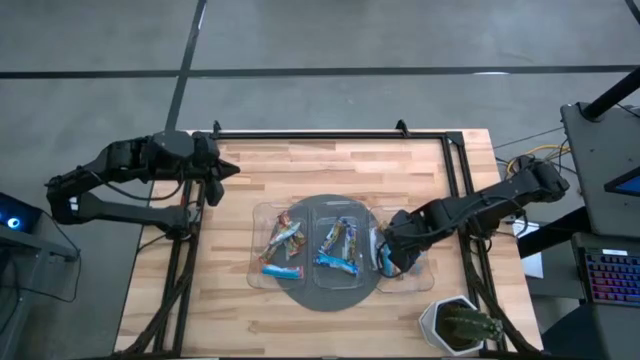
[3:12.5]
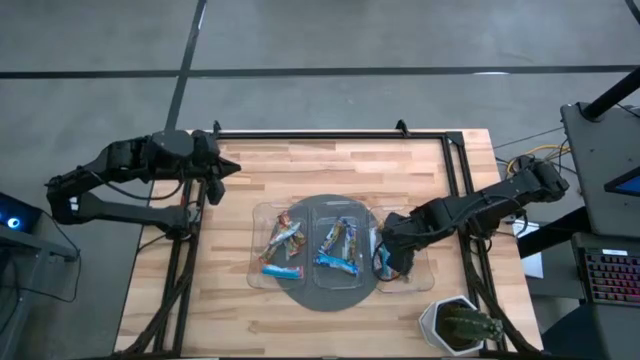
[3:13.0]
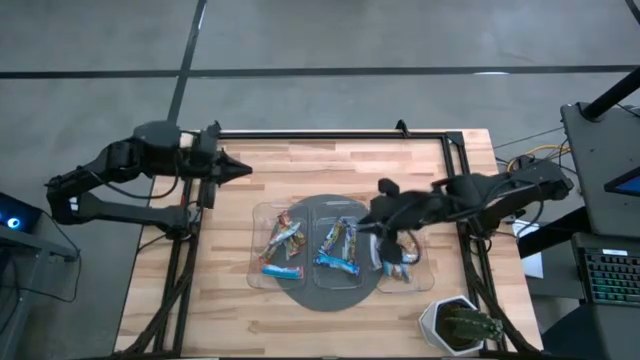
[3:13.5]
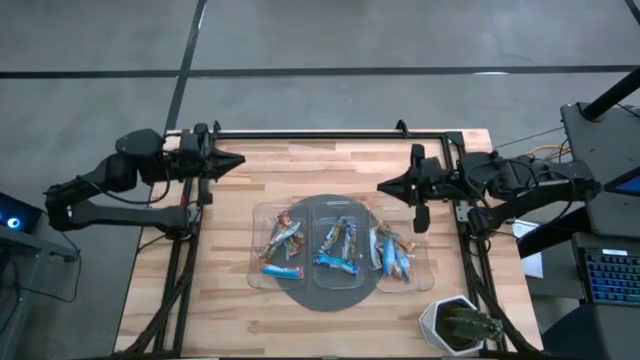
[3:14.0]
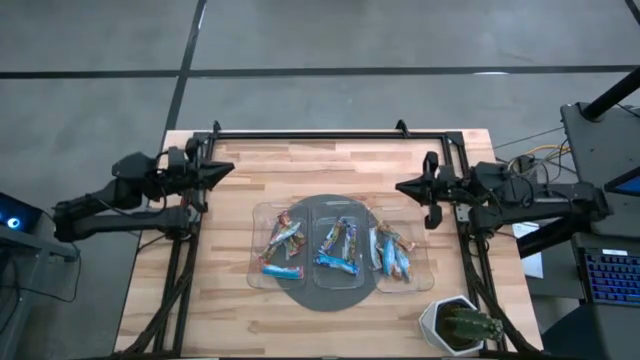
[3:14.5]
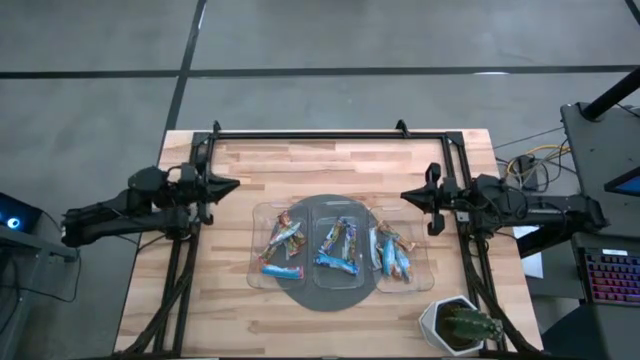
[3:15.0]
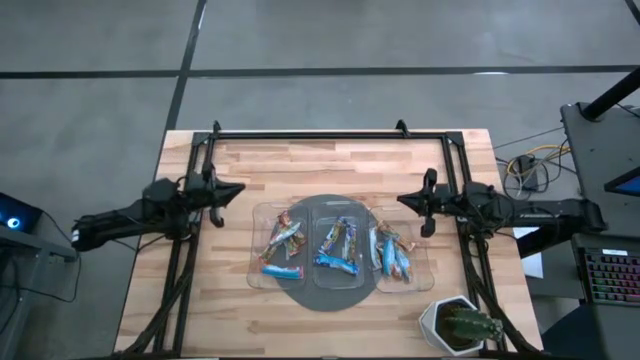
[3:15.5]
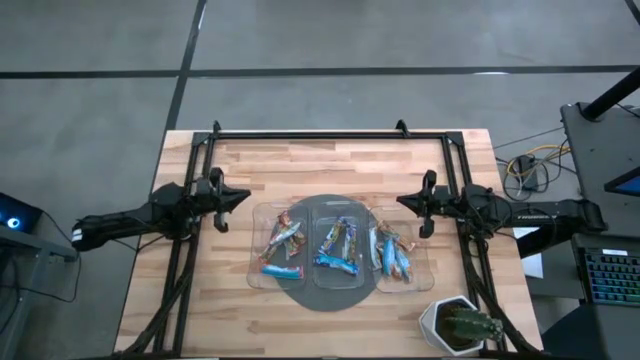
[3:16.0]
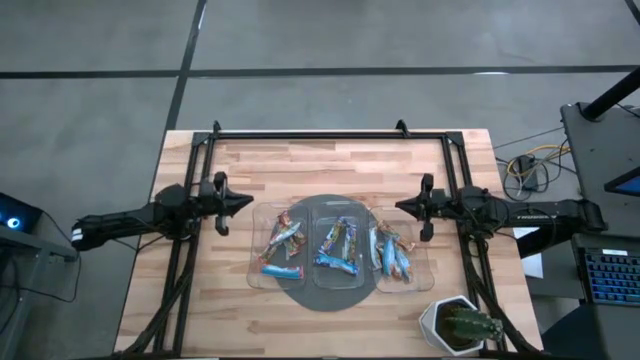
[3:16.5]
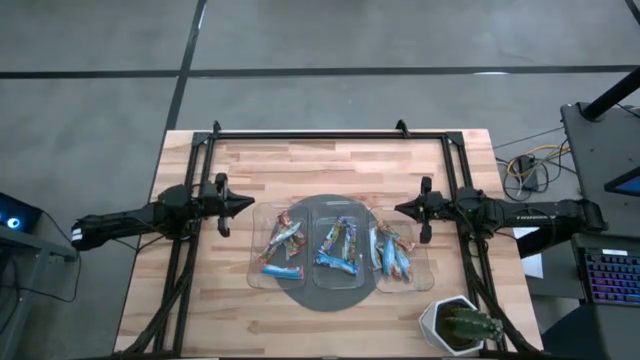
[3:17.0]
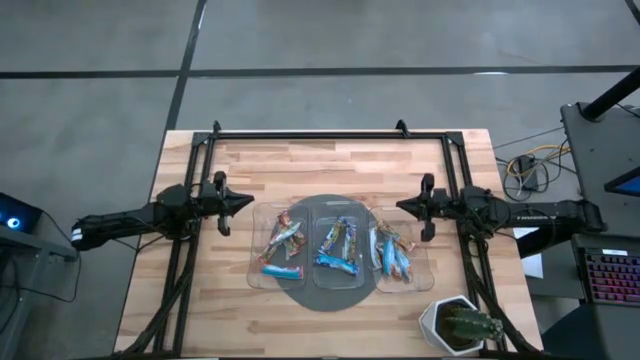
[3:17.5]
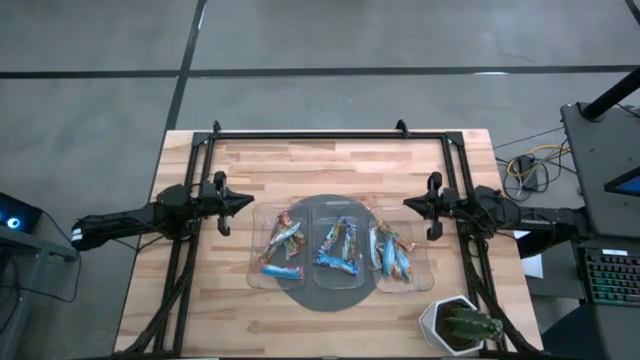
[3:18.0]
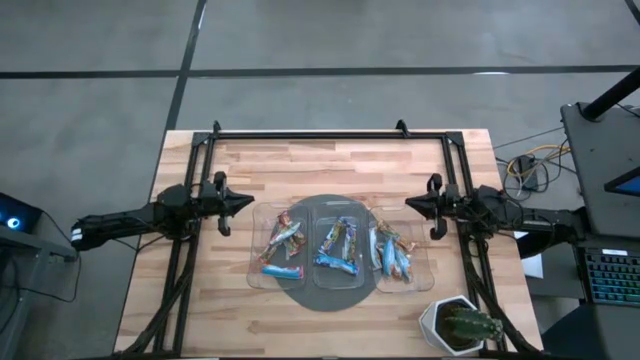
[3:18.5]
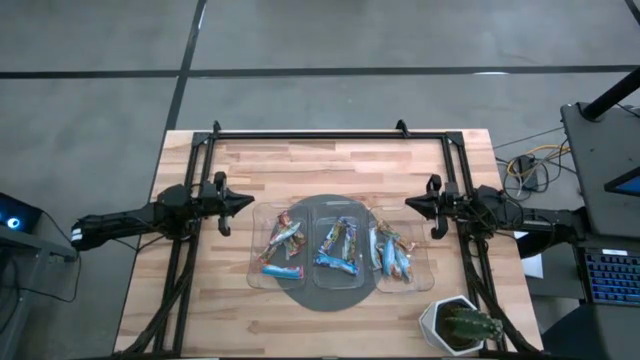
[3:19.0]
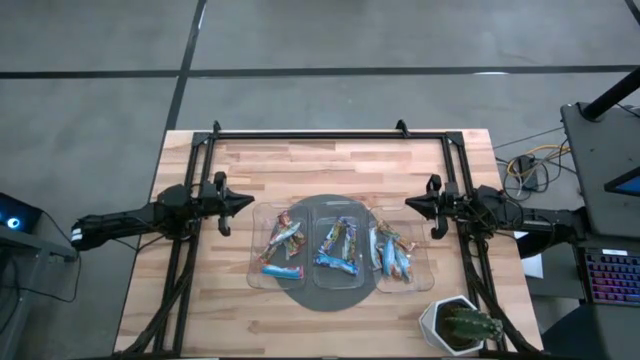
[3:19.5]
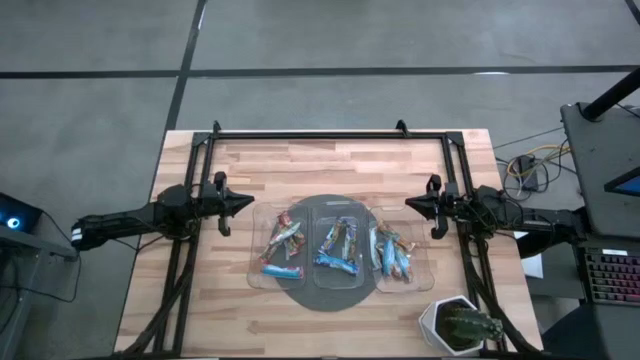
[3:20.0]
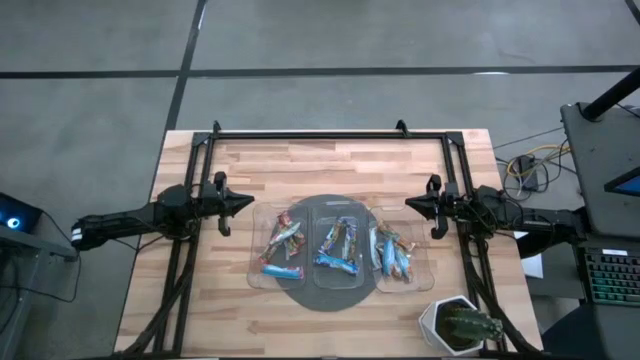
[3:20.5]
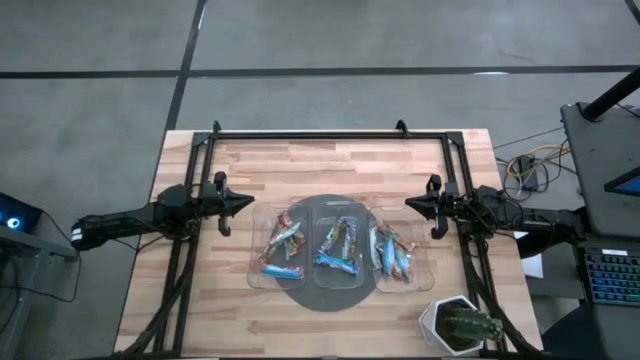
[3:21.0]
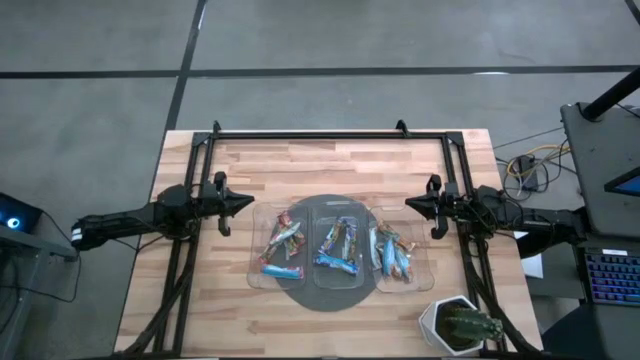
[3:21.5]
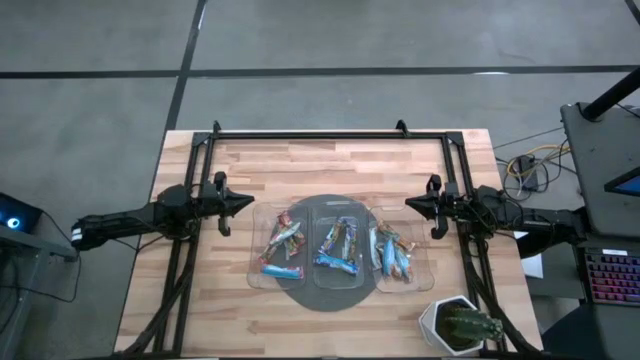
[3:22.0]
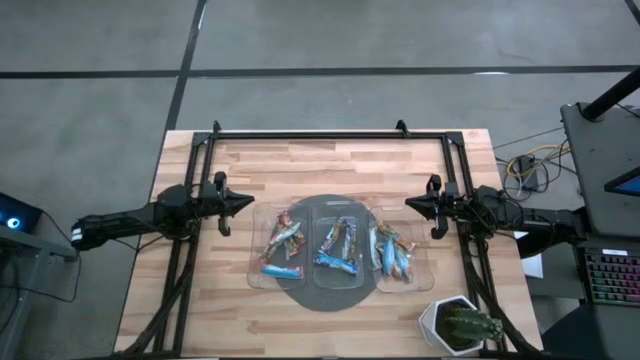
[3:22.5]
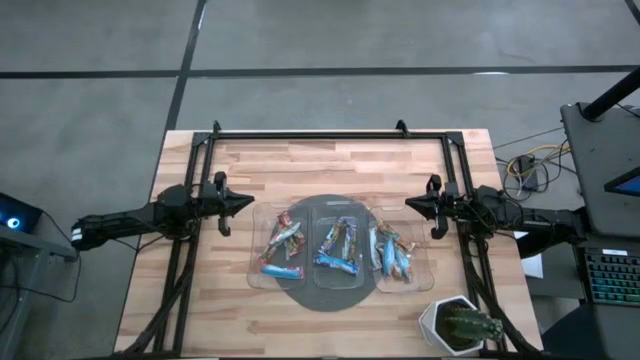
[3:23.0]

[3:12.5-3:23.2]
Task: Pick and place Granola Bars by type
Return to home position

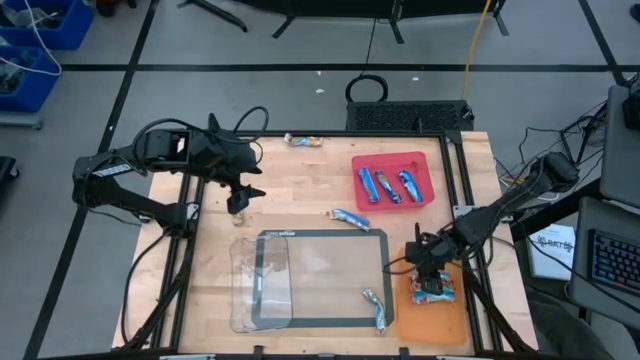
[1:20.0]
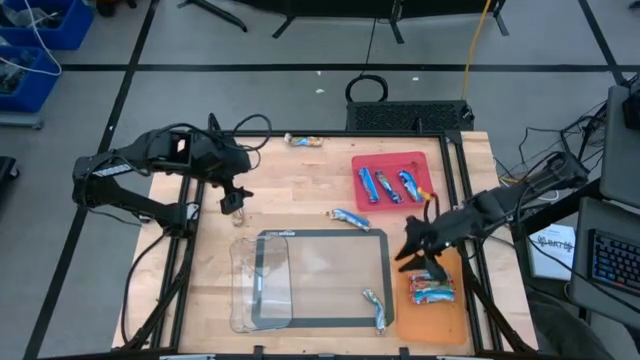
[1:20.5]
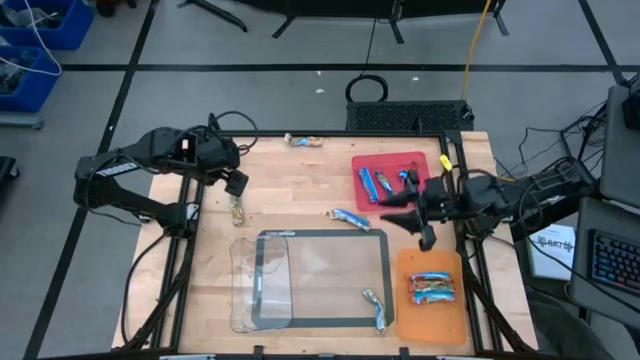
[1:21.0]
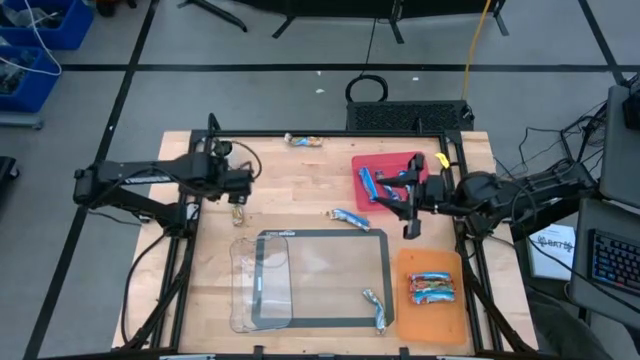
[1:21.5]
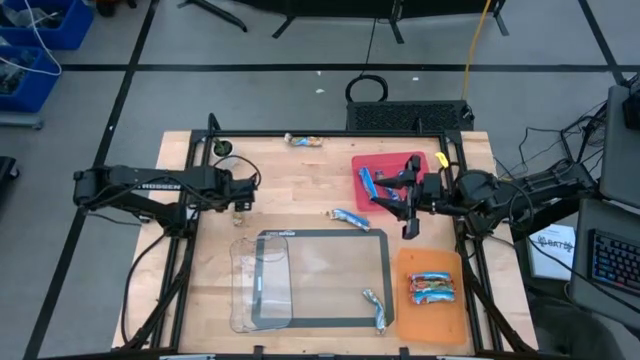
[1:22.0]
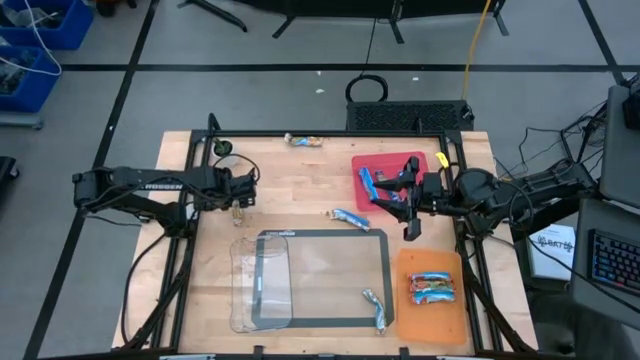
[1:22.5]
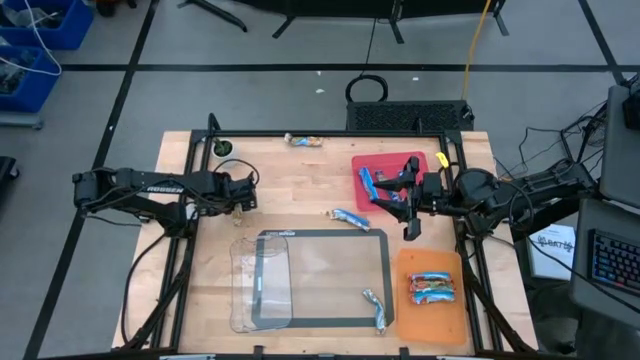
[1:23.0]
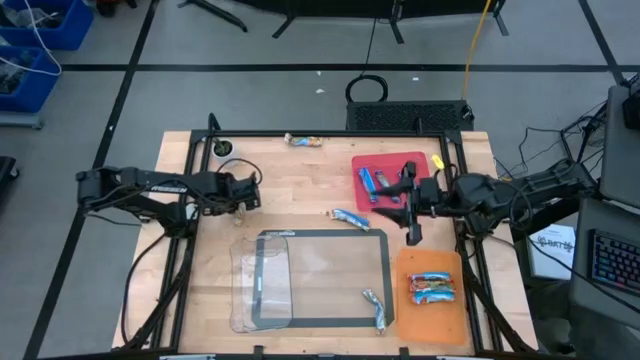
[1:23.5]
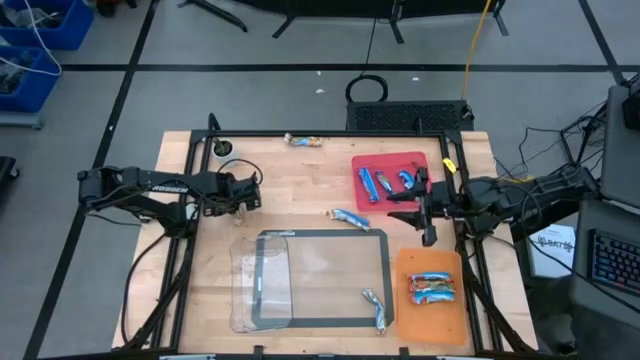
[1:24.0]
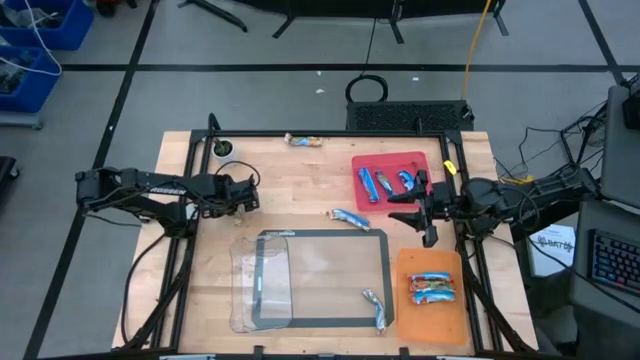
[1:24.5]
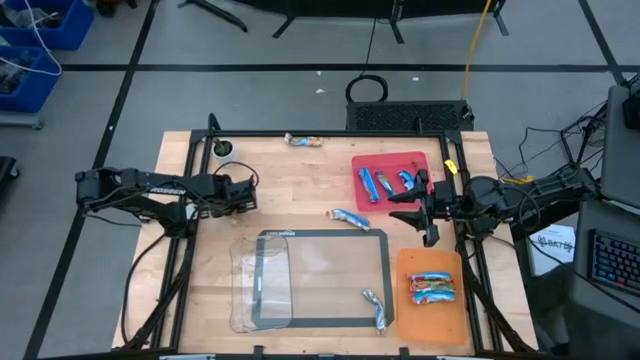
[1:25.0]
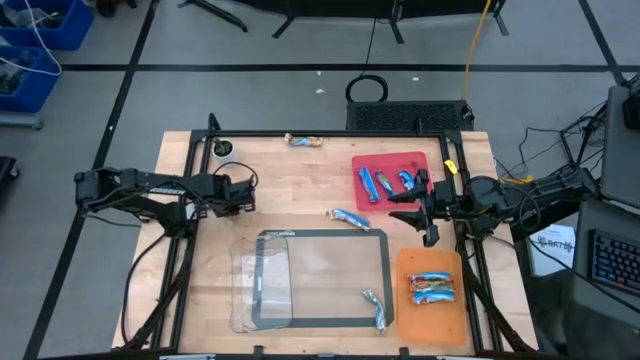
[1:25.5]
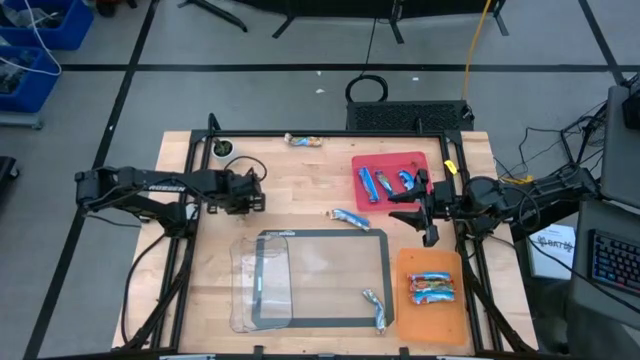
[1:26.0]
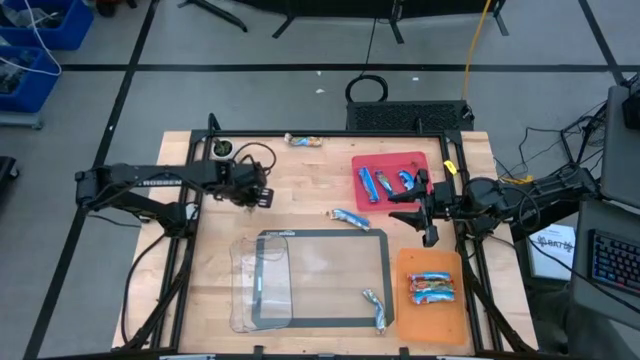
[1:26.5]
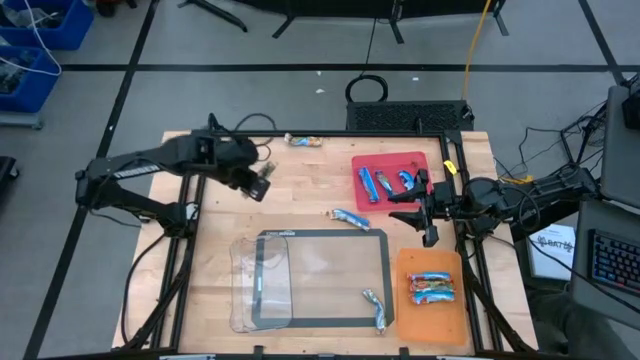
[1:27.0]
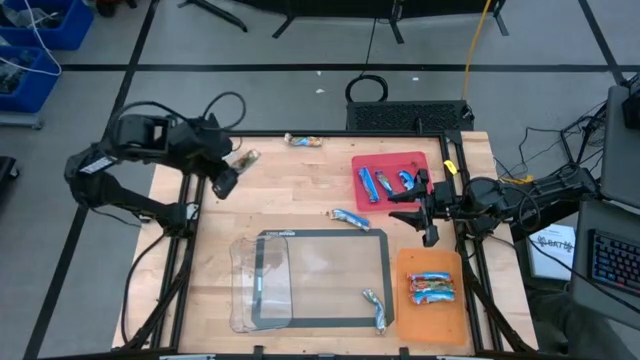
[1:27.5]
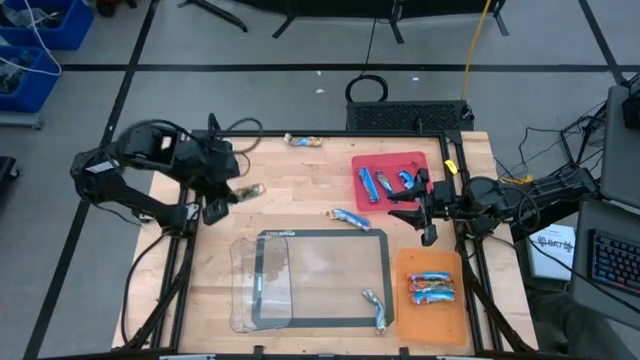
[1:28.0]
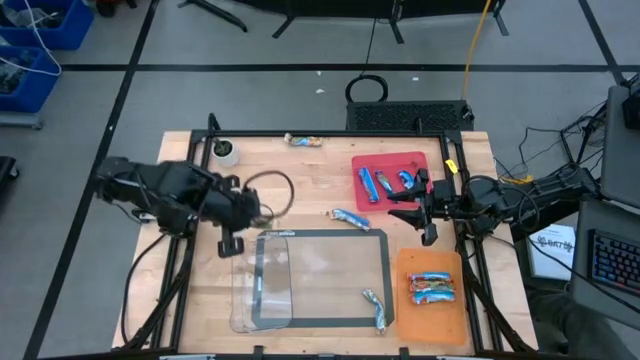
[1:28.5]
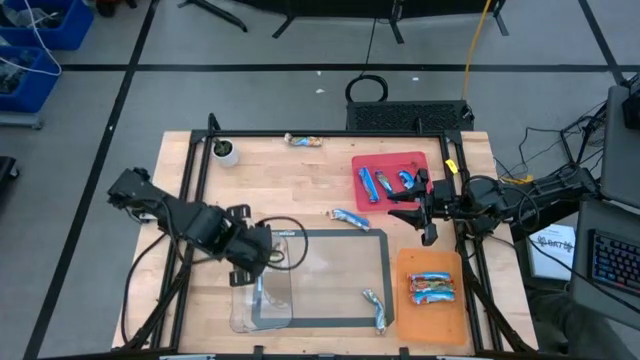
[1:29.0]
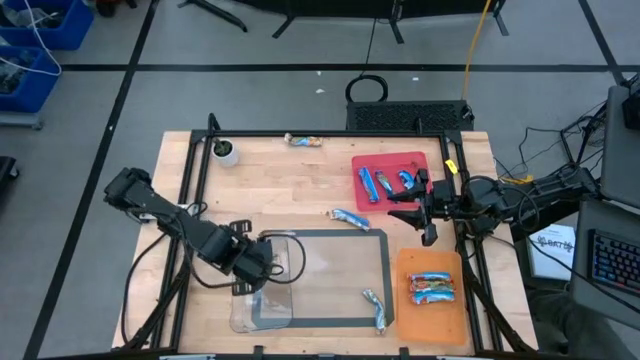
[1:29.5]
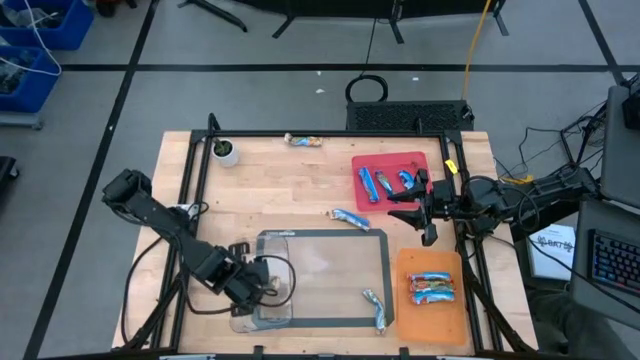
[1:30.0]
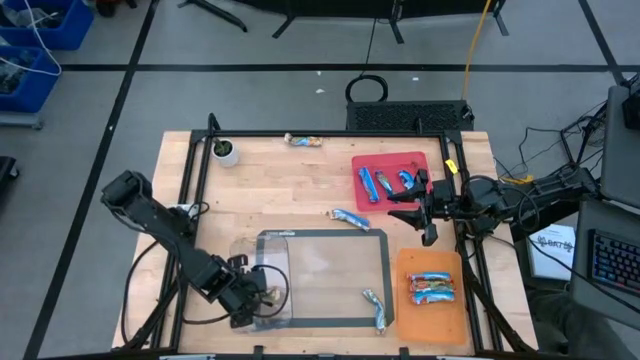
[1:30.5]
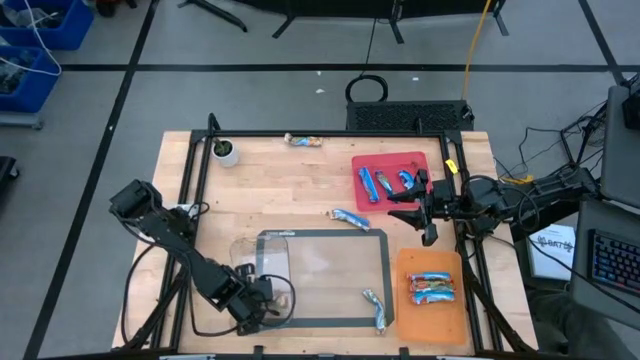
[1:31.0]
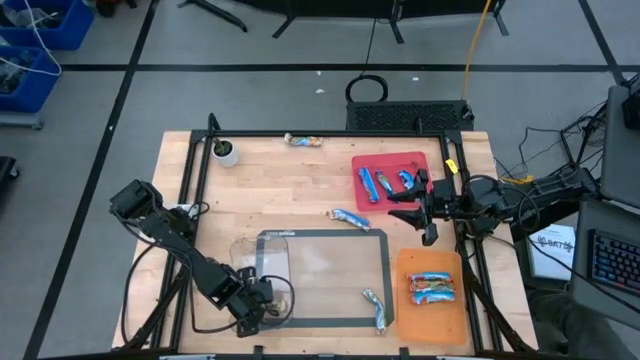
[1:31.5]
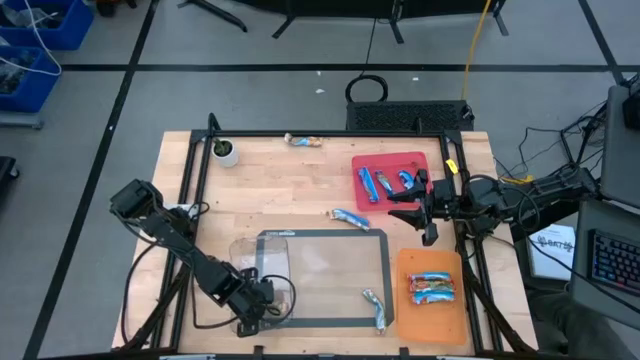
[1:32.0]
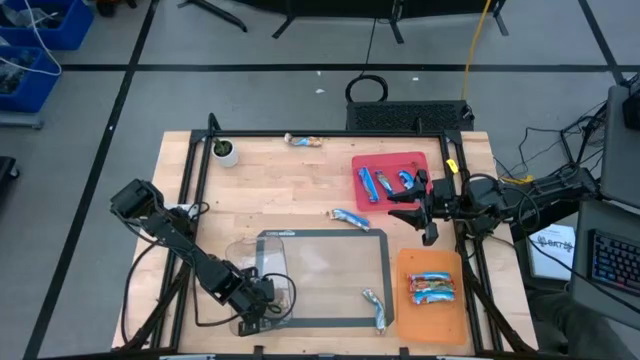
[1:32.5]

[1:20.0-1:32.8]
Task: Pick and place Granola Bars by type
Put the yellow granola bar into the transparent bin
